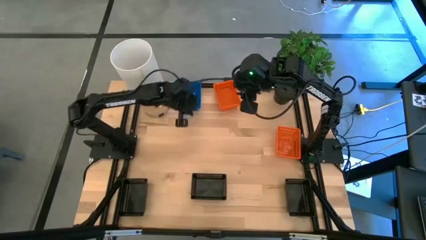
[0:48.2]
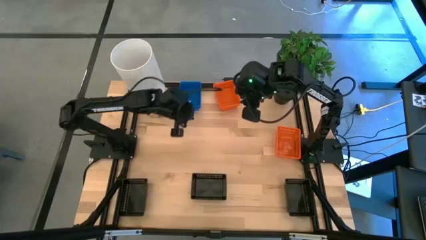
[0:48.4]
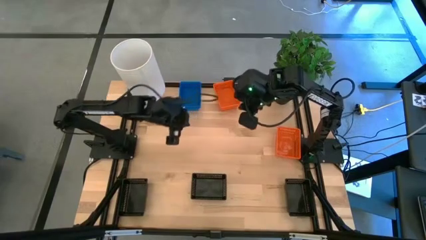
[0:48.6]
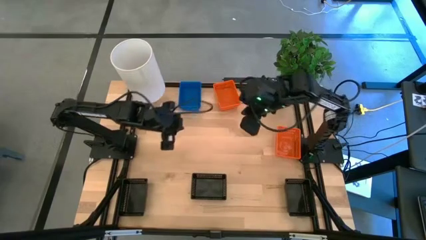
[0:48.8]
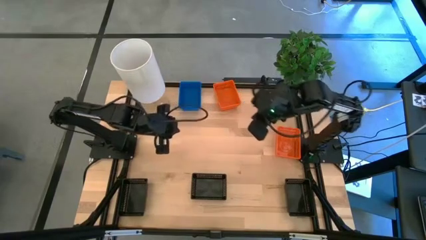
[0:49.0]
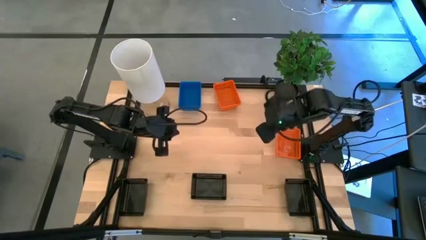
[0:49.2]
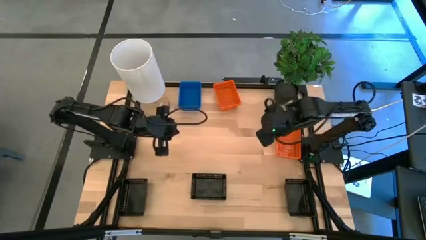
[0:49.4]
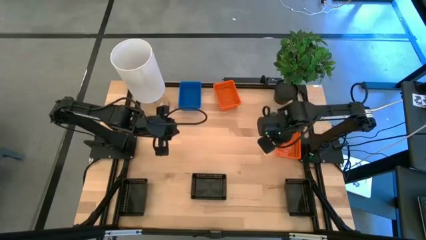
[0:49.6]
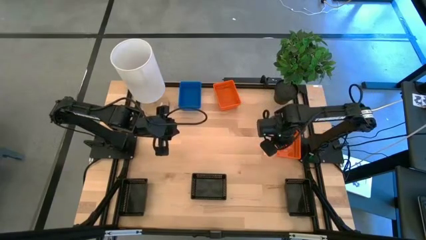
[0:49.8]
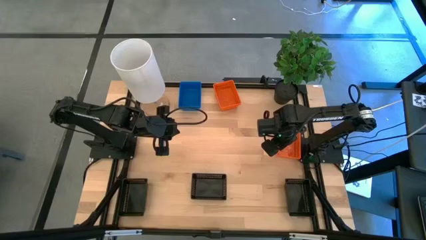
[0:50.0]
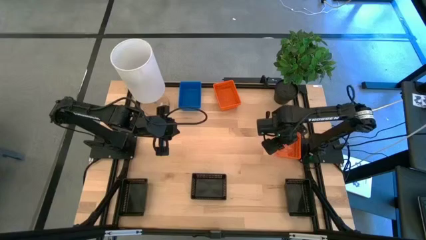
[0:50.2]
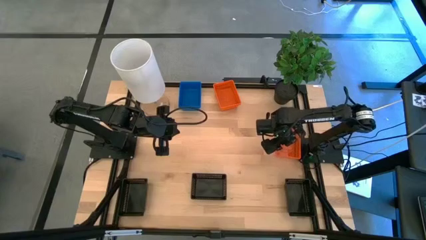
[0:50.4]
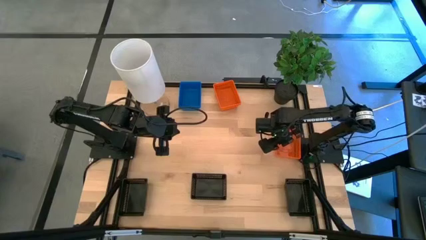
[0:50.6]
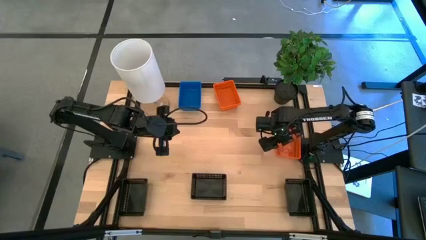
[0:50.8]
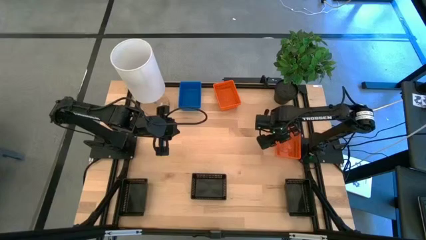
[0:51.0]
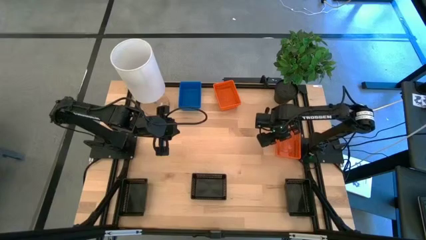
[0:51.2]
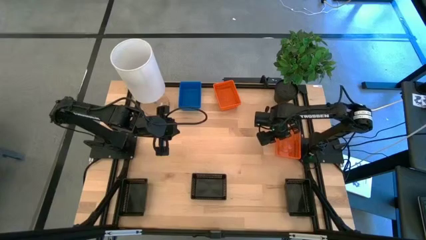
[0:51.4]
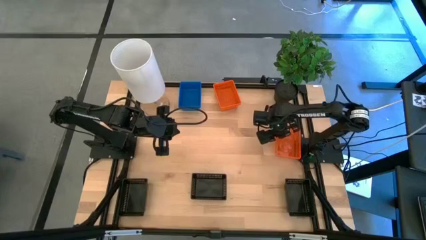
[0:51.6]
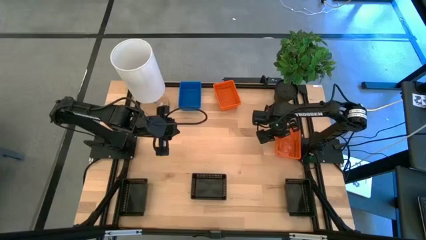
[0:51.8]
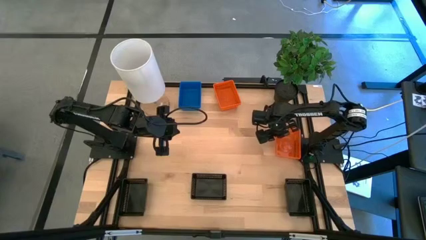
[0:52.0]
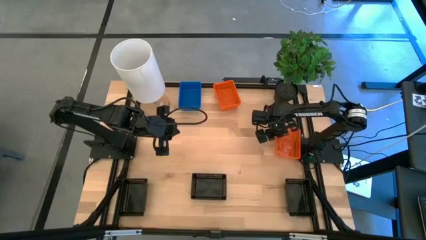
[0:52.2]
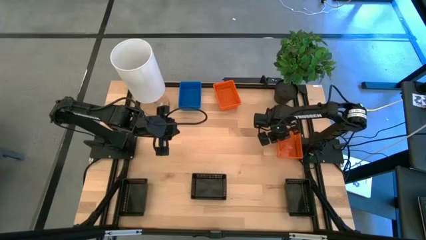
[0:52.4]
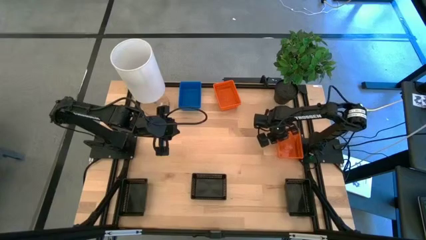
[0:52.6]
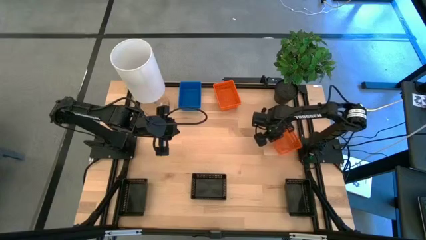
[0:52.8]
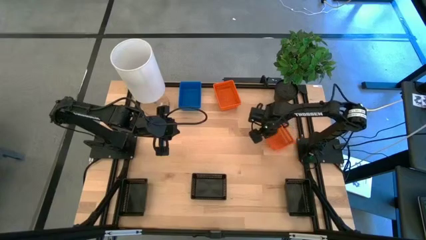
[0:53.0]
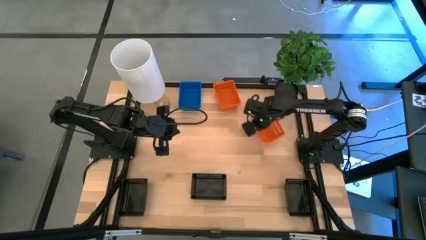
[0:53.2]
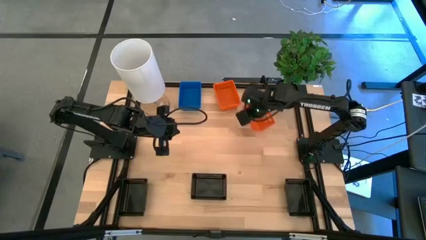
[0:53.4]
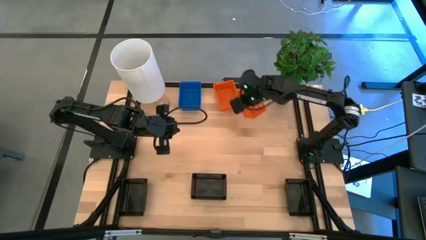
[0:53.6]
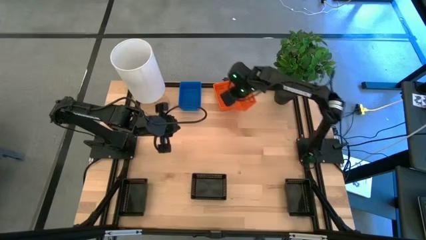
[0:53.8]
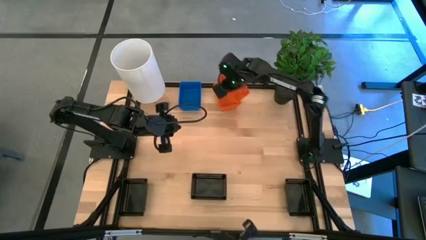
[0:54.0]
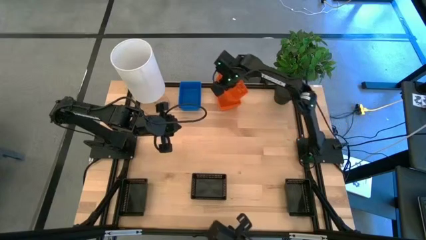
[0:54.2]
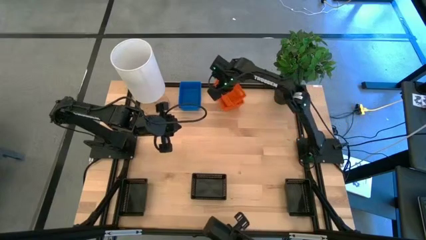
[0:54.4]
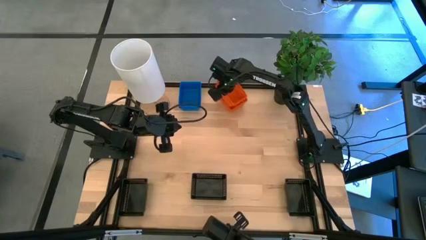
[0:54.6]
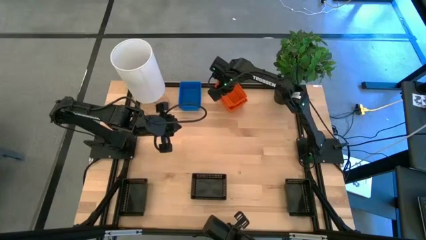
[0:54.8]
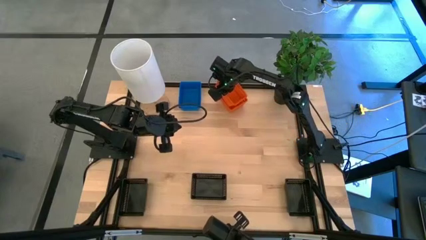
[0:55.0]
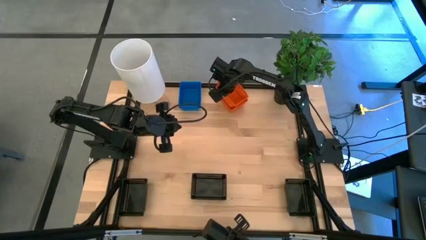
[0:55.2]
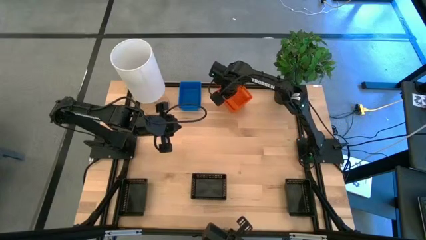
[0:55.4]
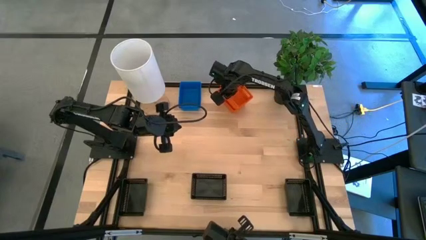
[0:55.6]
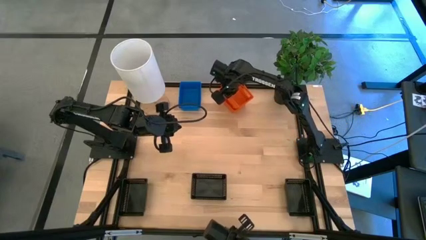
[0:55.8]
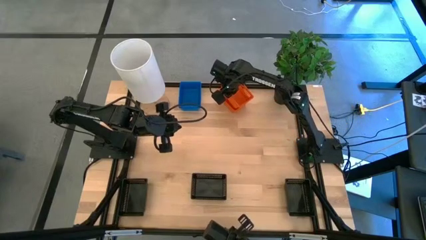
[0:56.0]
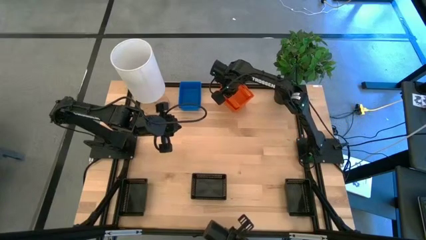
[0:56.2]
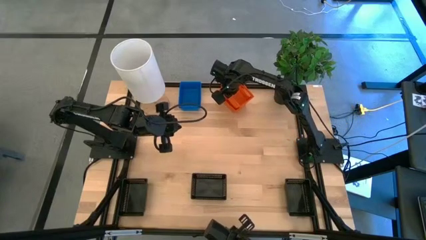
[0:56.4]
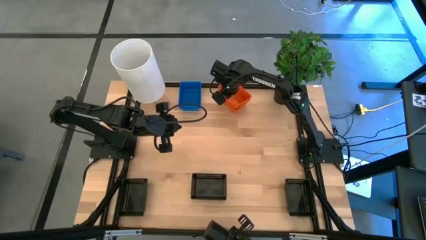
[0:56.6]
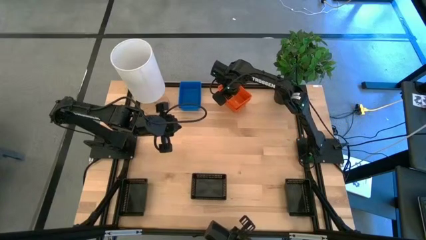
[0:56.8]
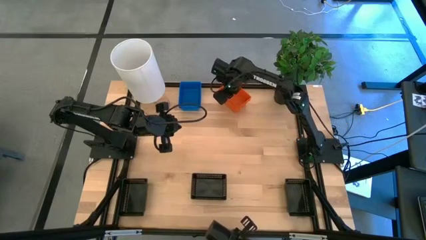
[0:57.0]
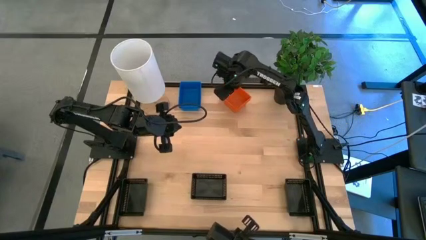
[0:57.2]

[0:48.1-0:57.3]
Stack the orange basket on top of the orange basket on the table

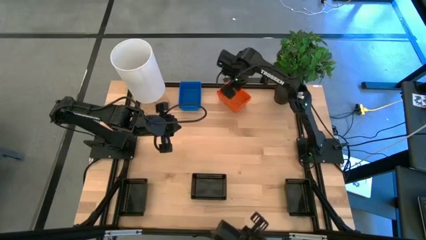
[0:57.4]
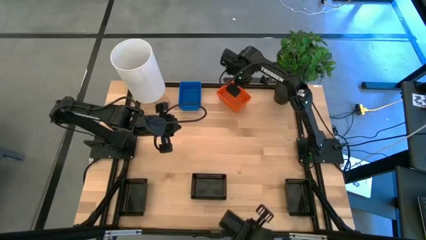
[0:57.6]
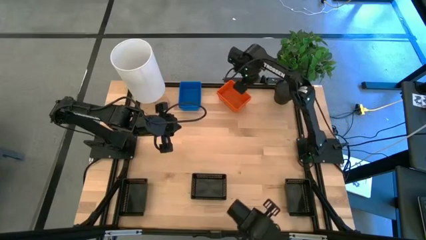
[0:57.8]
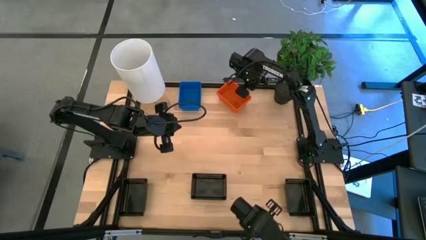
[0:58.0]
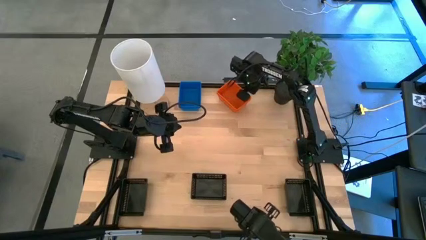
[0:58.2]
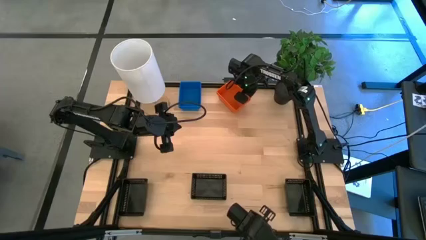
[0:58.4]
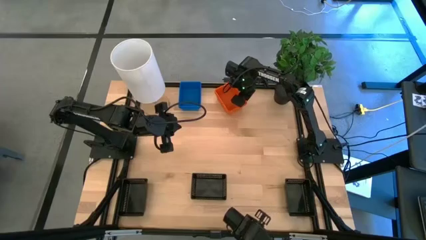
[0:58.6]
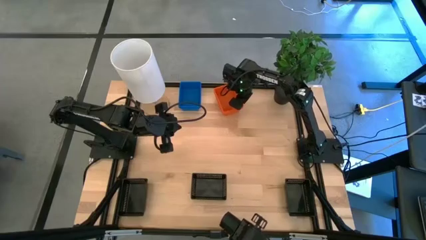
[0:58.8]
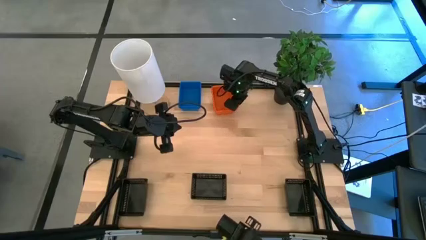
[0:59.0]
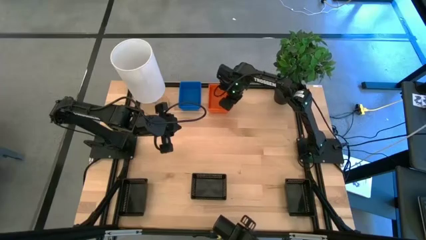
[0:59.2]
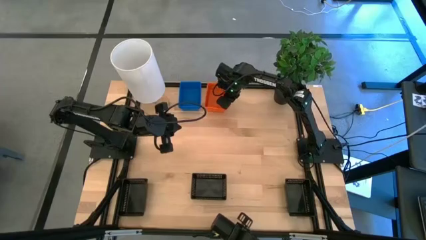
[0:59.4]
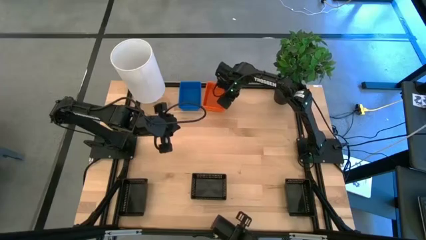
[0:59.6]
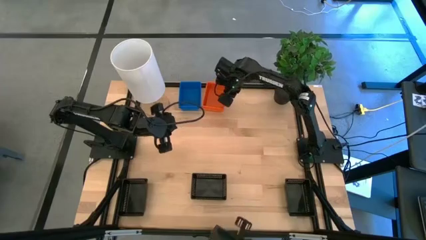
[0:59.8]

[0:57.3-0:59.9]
Adjust the orange baskets on the table

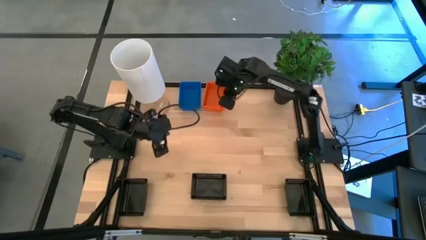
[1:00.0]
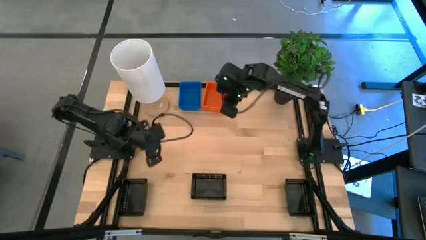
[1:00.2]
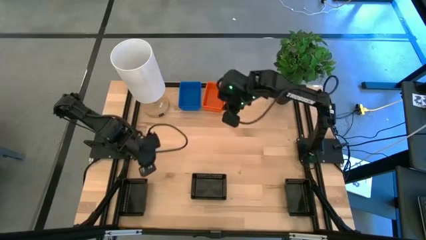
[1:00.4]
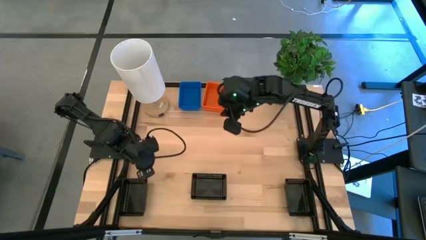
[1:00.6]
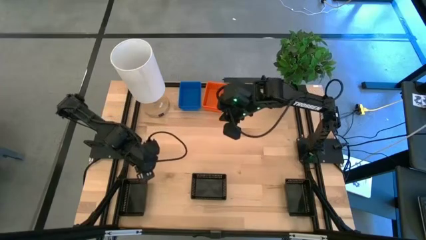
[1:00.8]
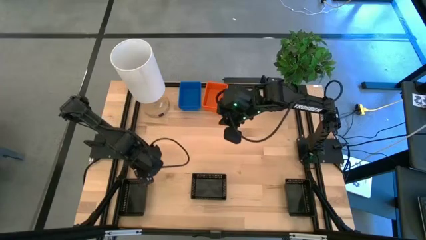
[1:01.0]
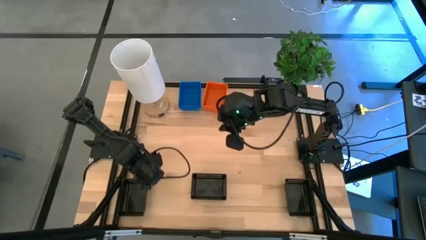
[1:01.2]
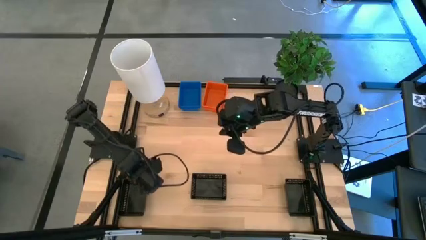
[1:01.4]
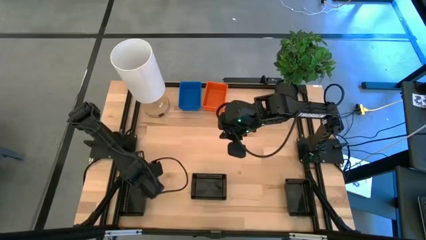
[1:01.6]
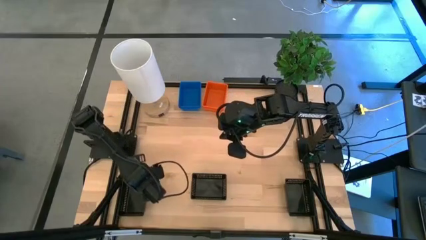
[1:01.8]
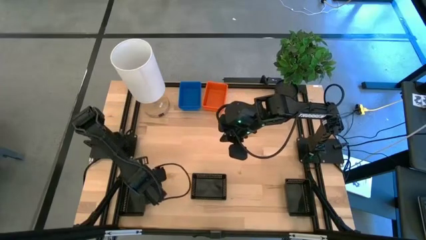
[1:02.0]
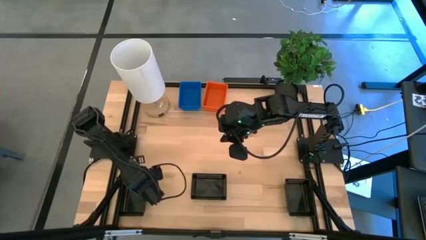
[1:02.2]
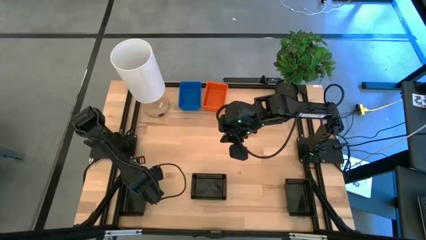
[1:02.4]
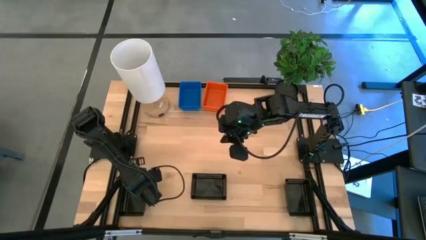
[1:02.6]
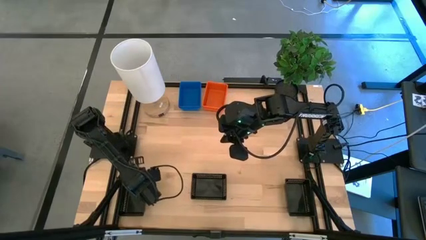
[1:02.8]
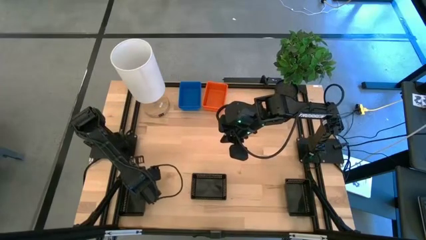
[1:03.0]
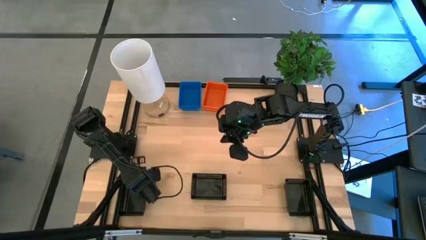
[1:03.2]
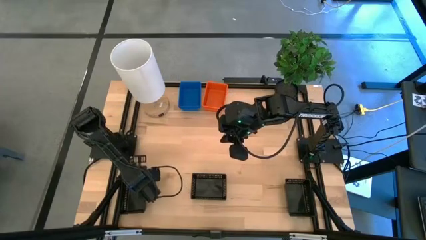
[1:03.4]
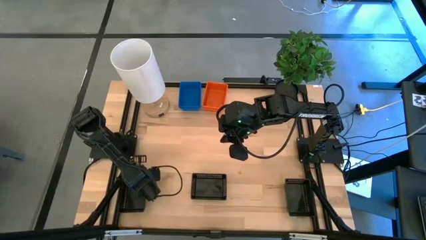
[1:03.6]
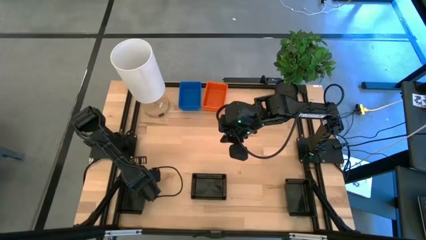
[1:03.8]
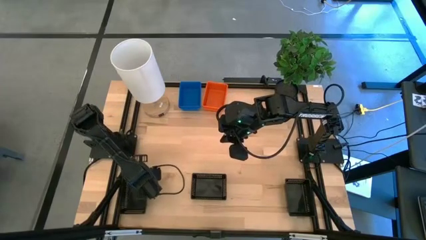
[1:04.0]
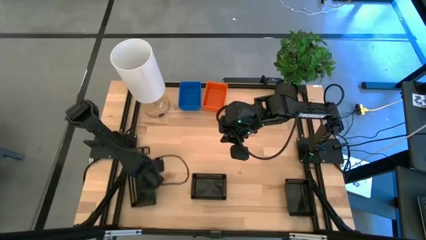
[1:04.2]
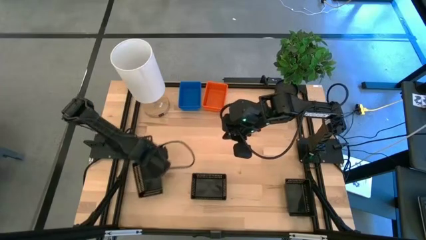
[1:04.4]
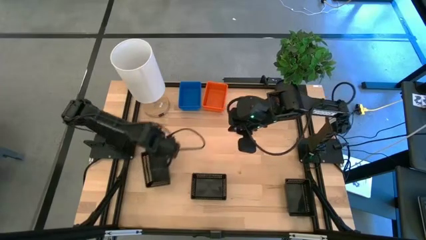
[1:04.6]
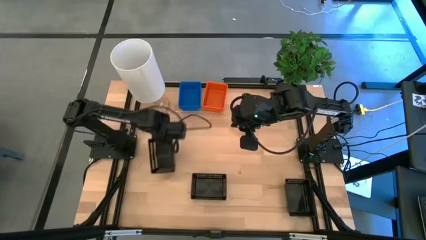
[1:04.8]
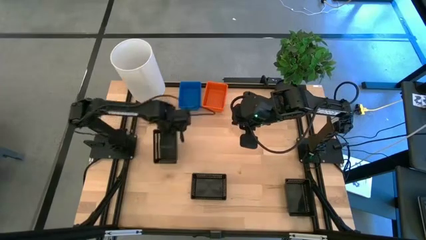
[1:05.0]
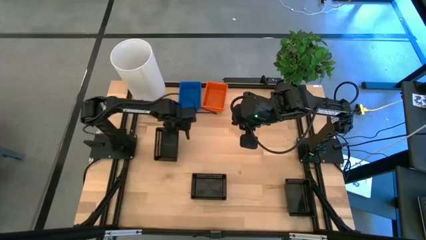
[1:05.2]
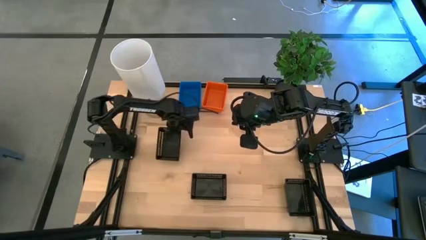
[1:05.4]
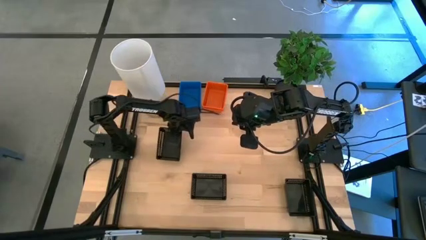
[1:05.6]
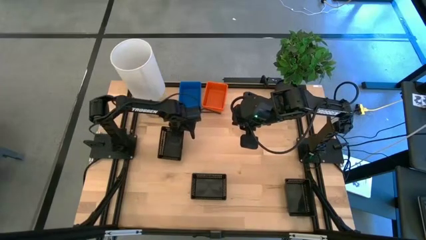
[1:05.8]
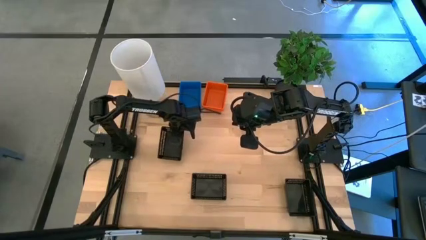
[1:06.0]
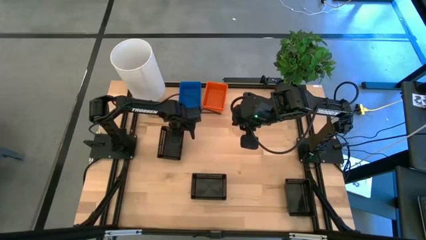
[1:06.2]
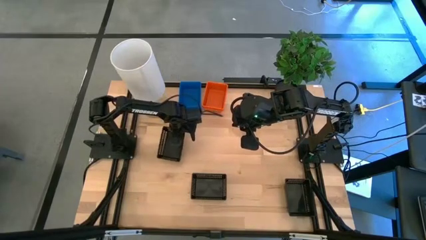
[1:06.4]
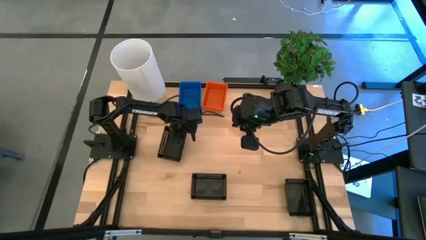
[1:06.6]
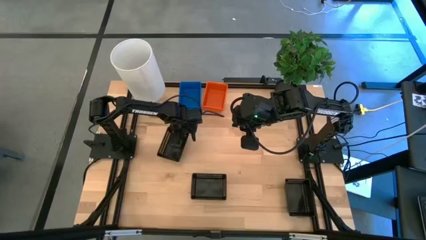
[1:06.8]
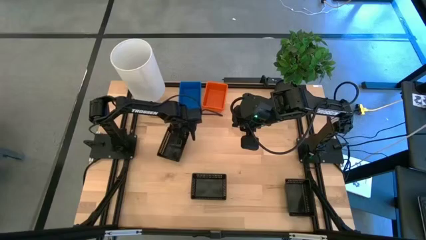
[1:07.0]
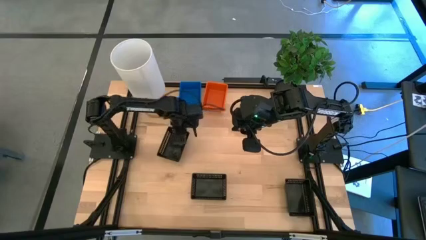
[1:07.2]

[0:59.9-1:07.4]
Move the left black basket to the middle left of the table
